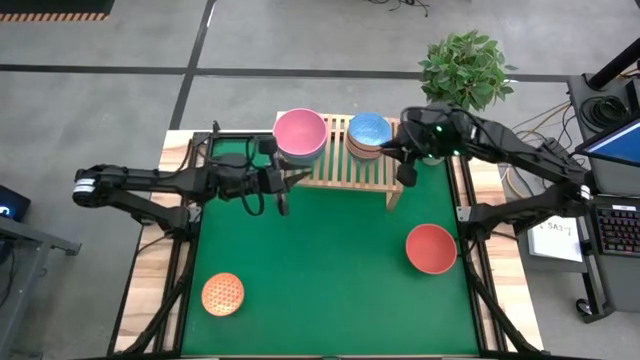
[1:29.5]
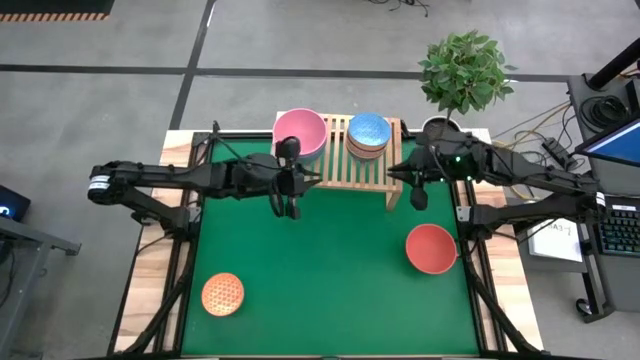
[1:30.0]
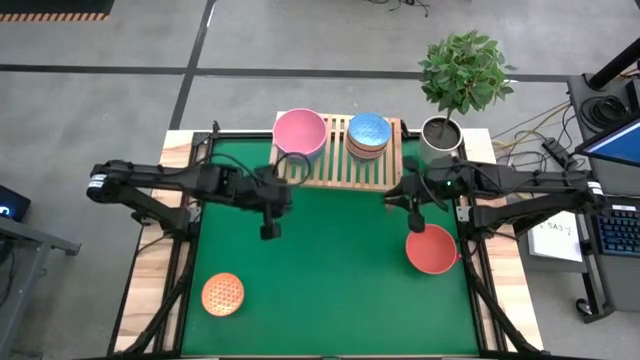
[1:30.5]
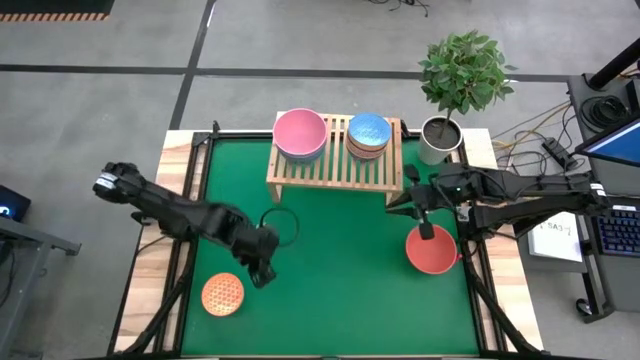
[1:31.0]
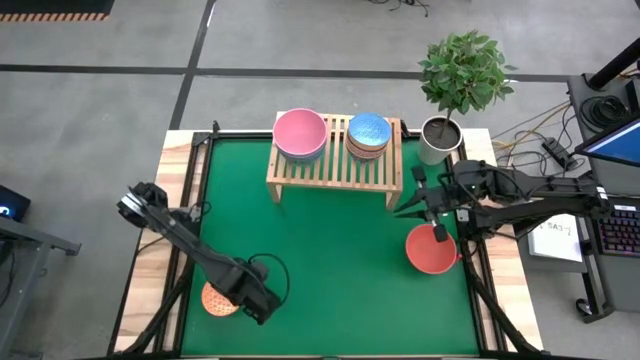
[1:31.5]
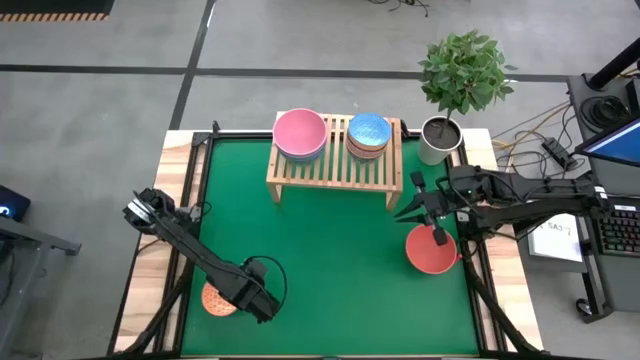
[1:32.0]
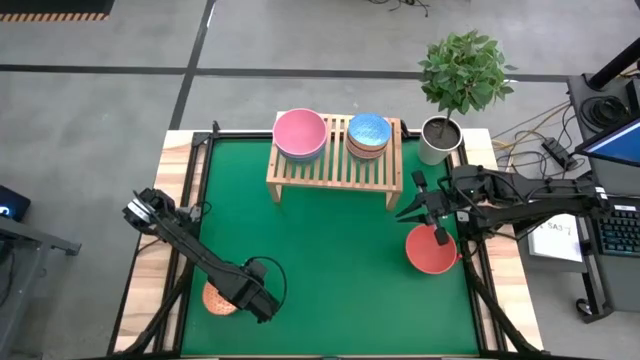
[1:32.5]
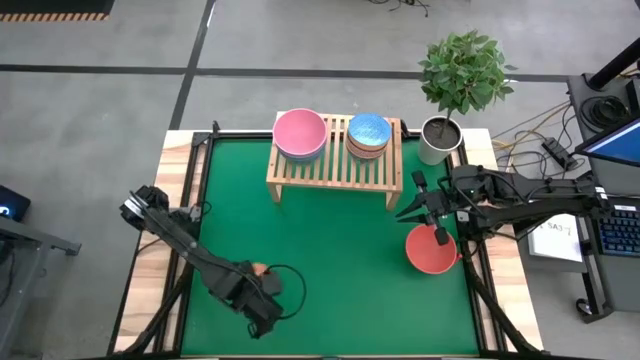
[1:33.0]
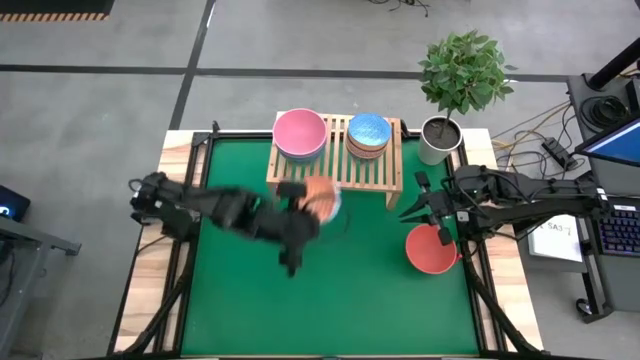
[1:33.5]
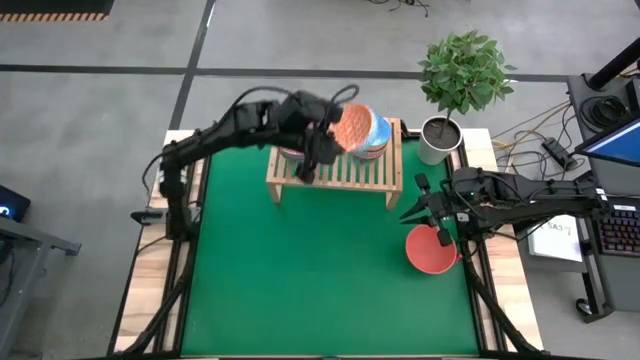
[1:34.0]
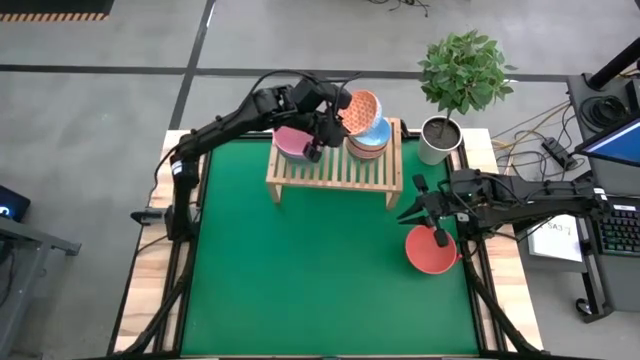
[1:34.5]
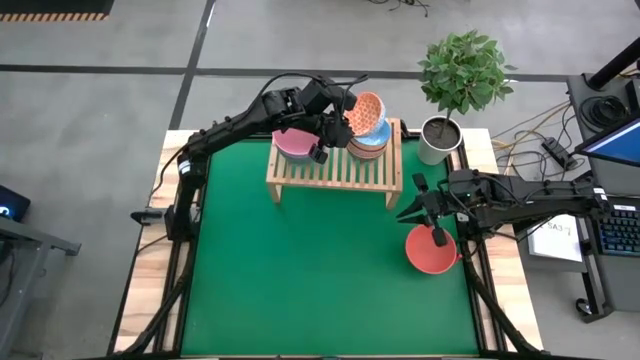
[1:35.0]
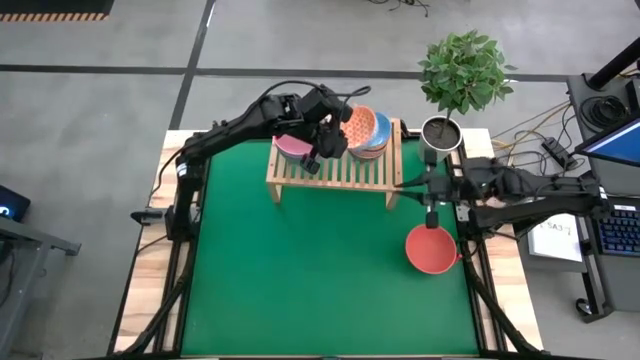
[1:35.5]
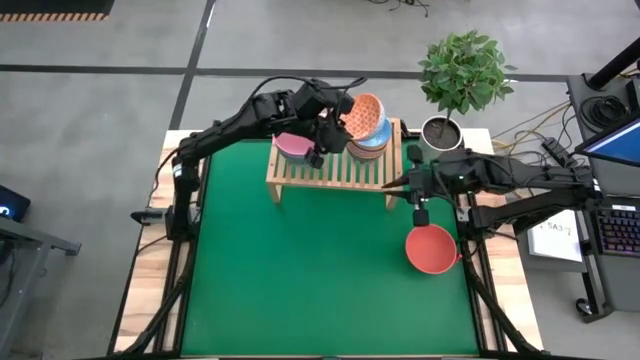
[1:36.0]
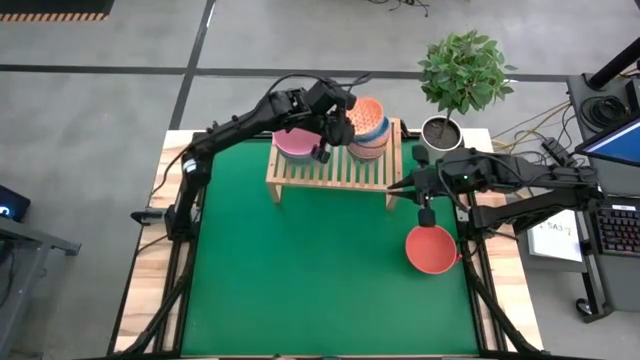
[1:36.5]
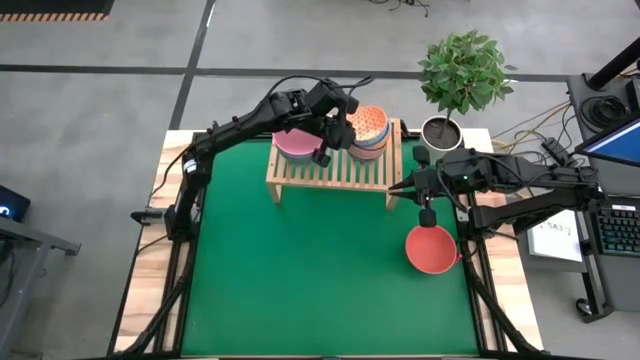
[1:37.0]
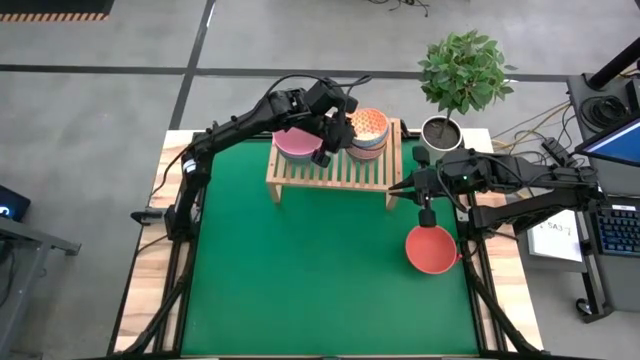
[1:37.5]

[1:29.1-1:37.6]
Task: Place and stack bowls onto a shelf
Stack the orange patterned bowl on top of the light blue patterned bowl on the shelf

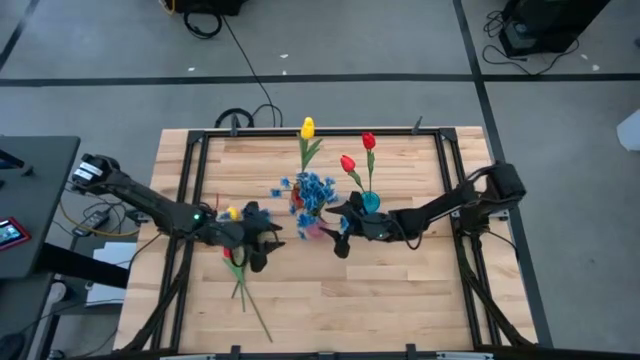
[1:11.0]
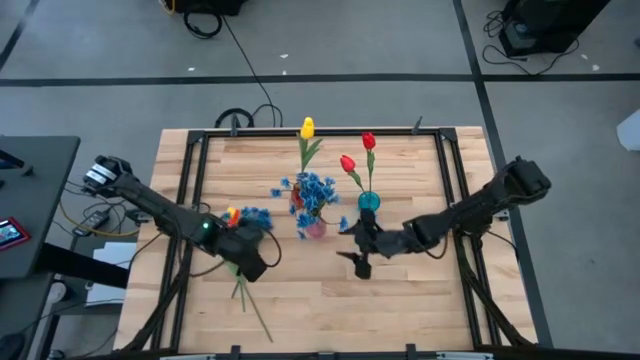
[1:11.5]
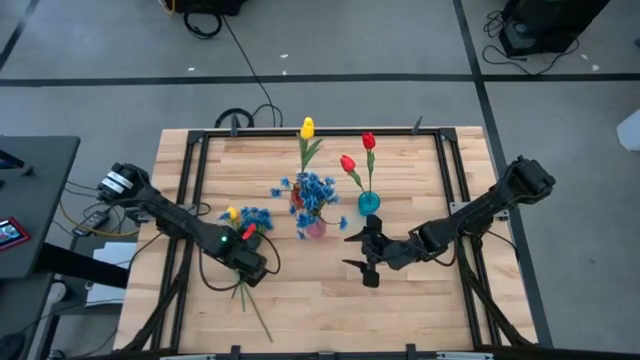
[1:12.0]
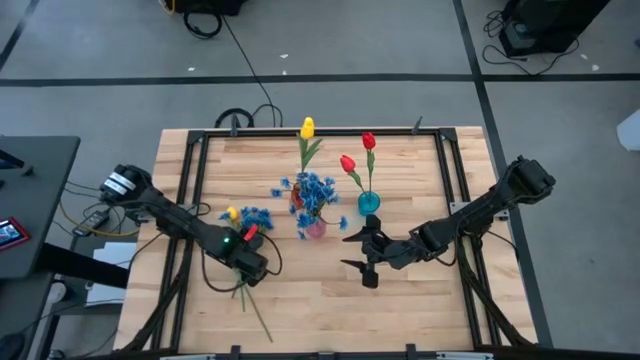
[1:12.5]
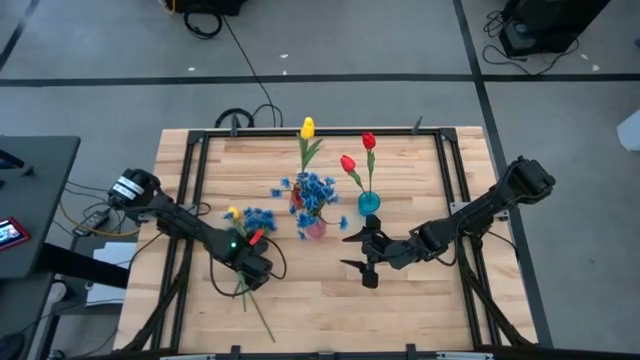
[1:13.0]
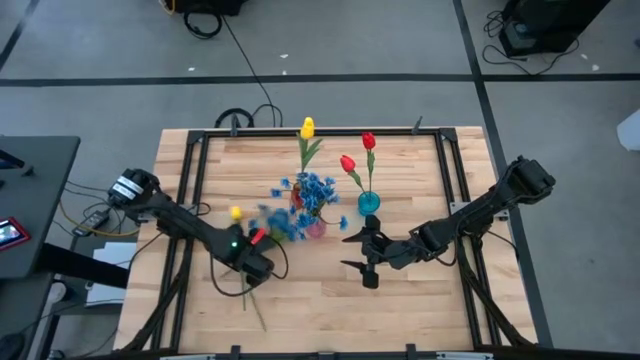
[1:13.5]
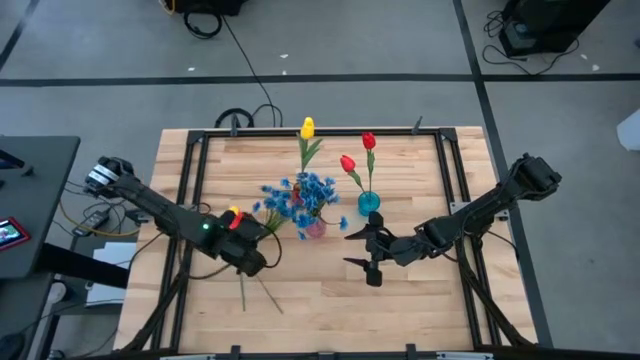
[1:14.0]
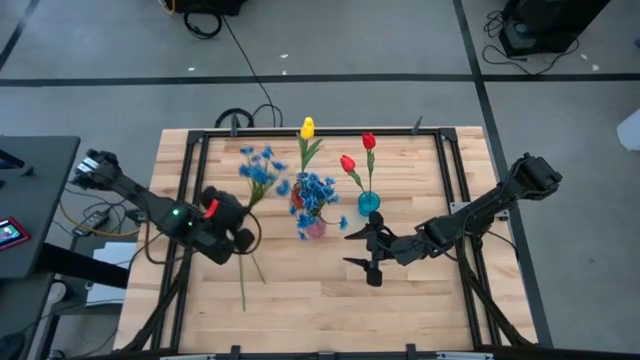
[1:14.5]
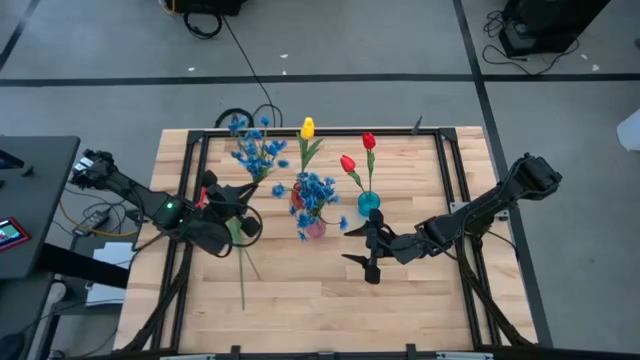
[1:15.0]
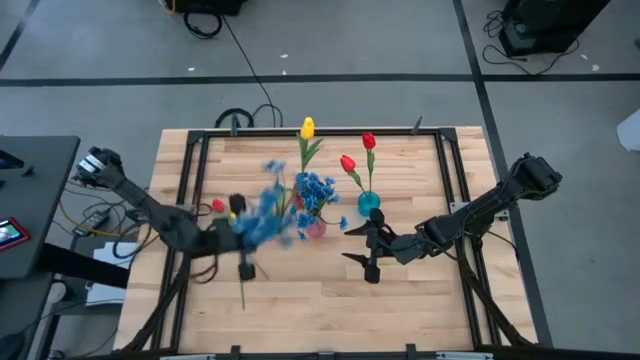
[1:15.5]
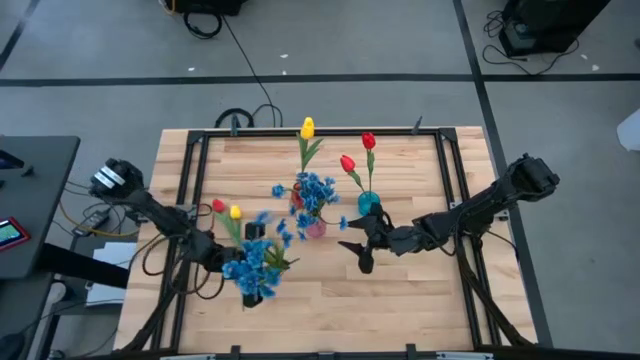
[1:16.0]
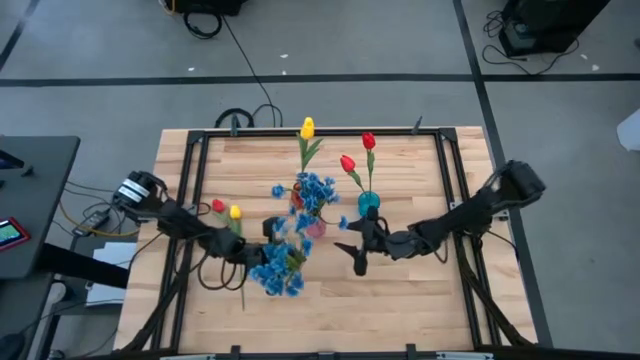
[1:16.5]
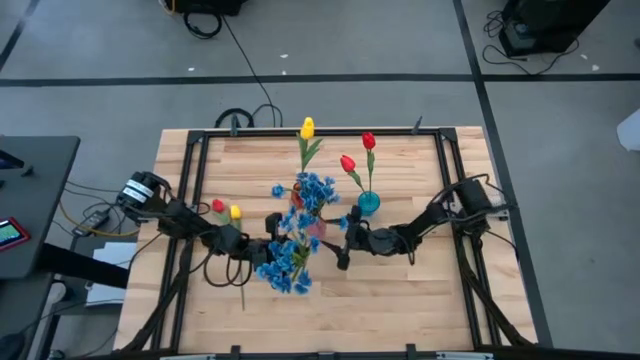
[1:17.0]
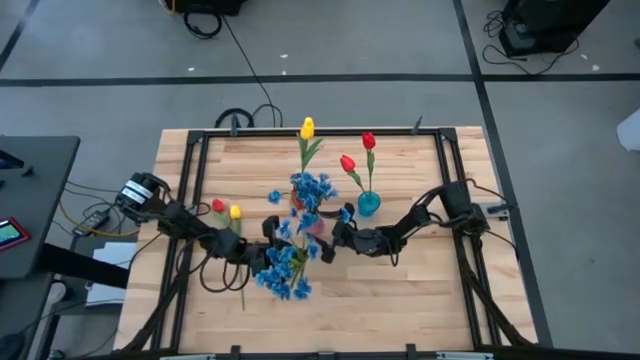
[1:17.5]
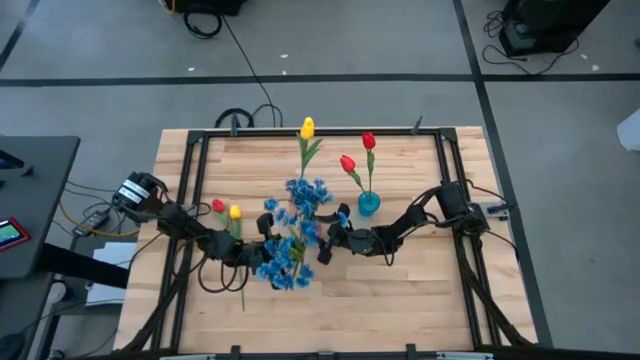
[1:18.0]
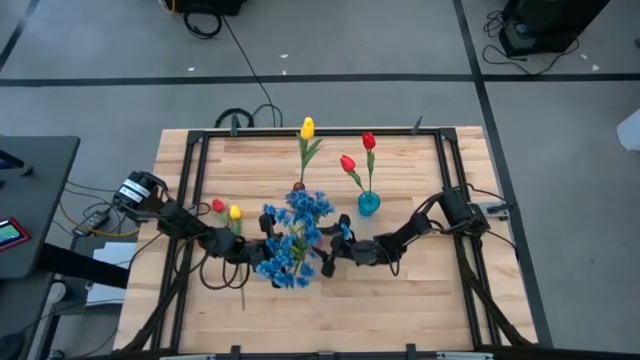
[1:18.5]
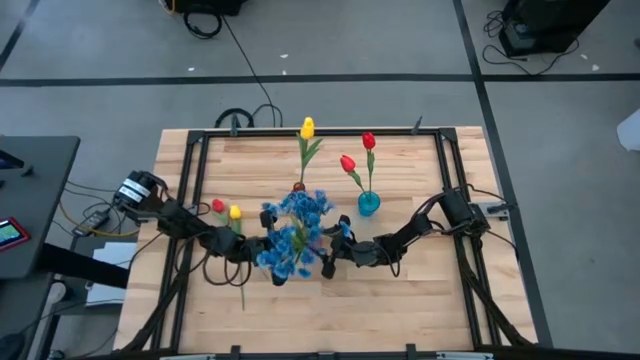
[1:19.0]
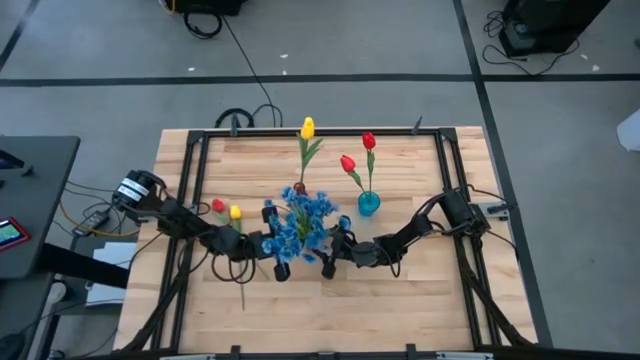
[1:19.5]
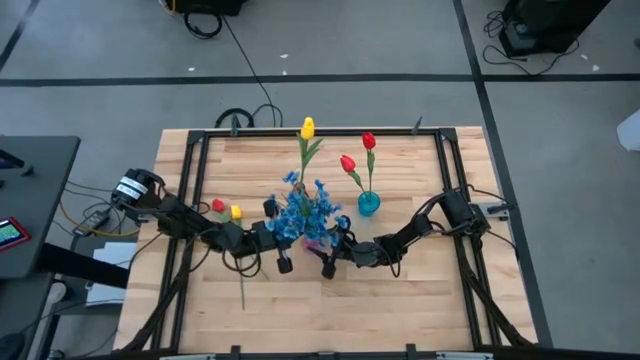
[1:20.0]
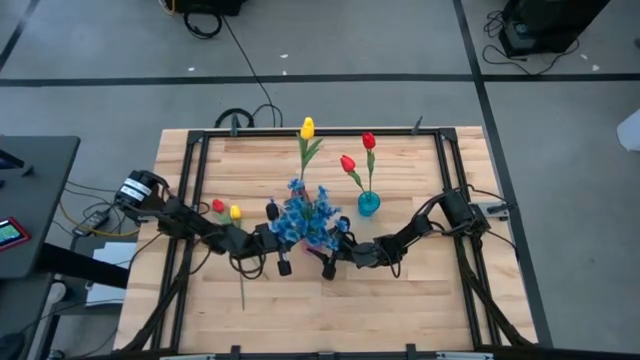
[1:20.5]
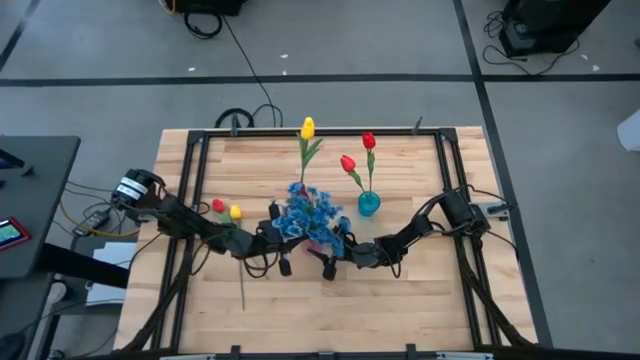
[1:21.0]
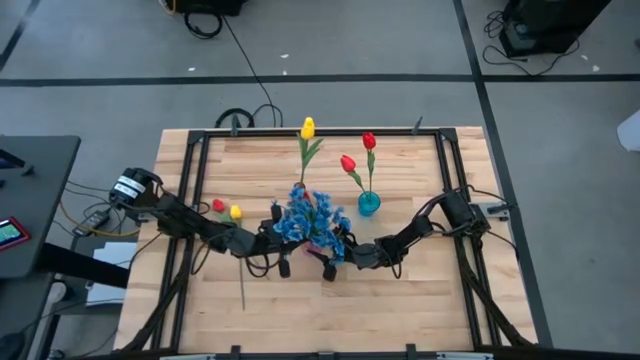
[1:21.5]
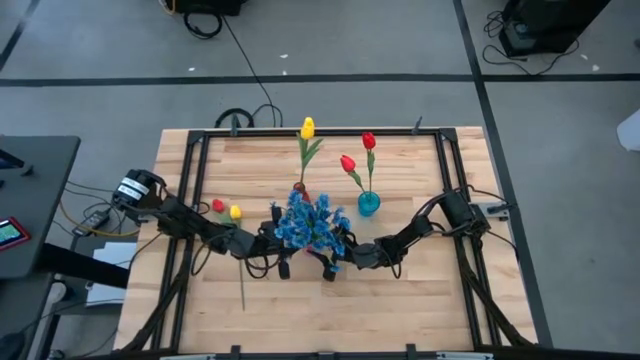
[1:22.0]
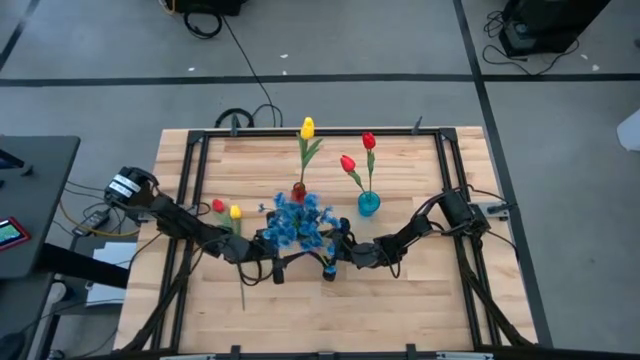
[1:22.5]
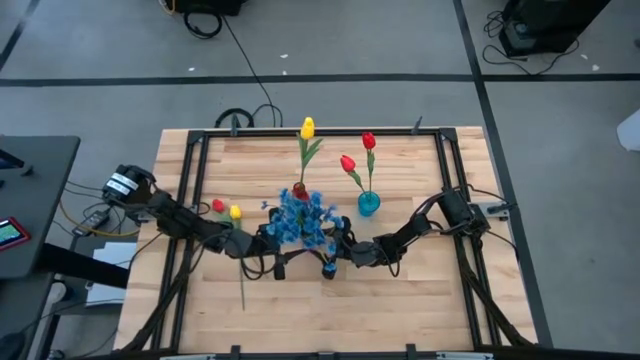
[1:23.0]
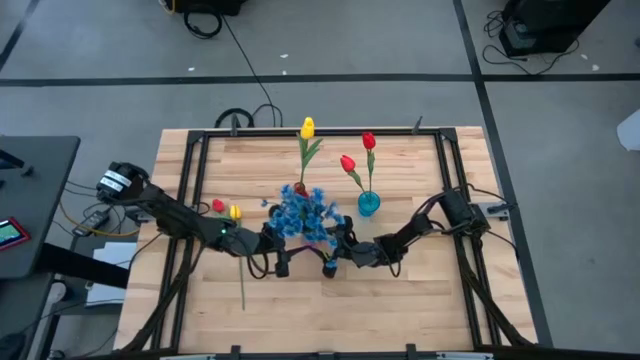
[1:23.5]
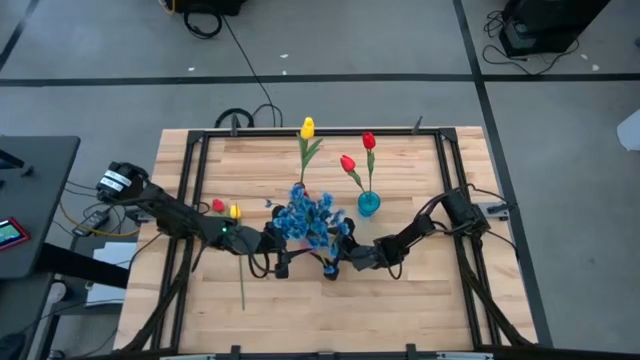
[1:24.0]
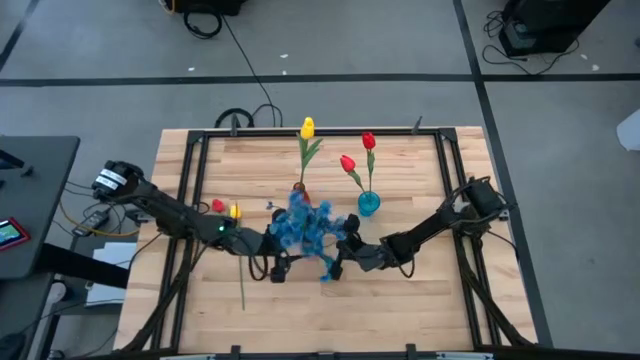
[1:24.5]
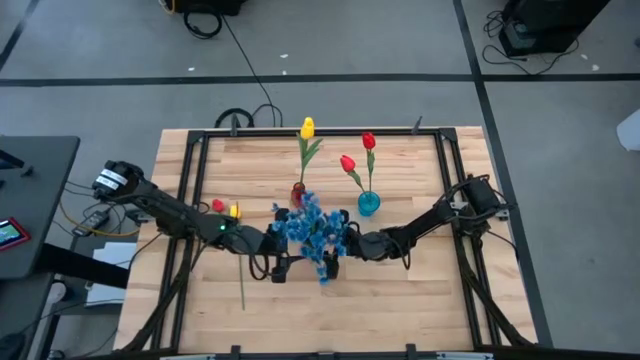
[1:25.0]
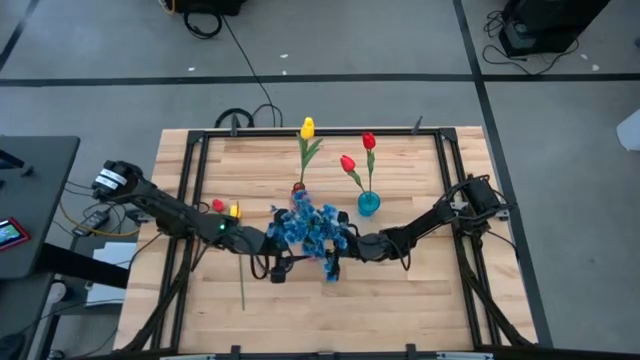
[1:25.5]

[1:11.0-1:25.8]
Task: Sort flowers into vase by color
Put the blue flowers into the pink transparent vase
